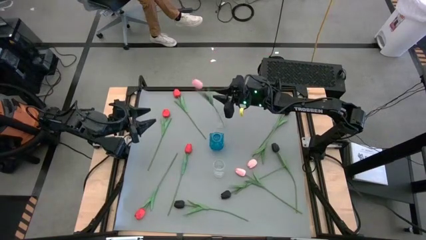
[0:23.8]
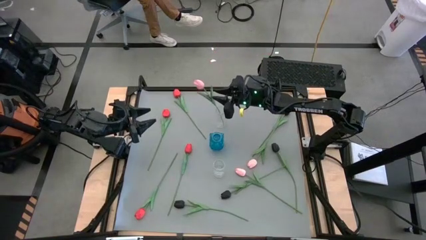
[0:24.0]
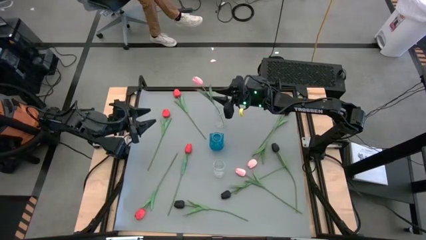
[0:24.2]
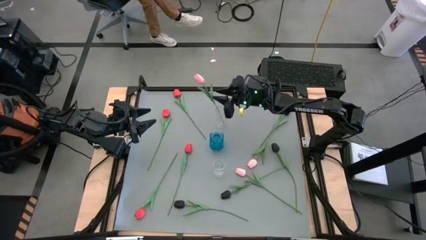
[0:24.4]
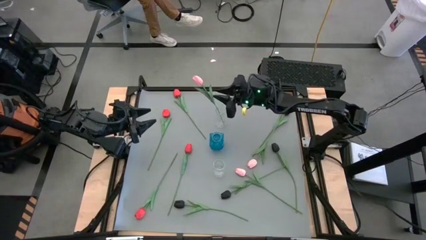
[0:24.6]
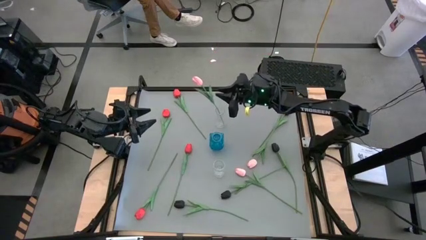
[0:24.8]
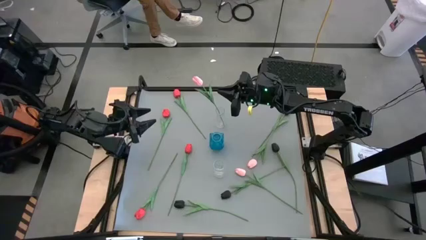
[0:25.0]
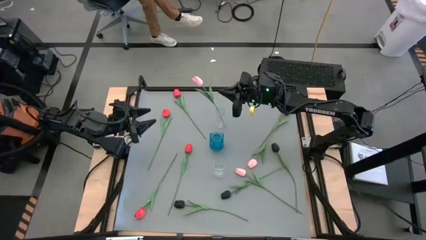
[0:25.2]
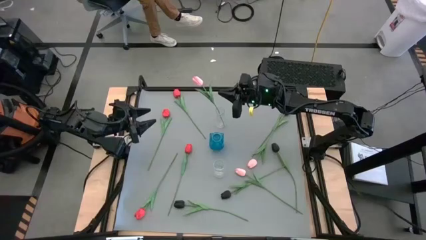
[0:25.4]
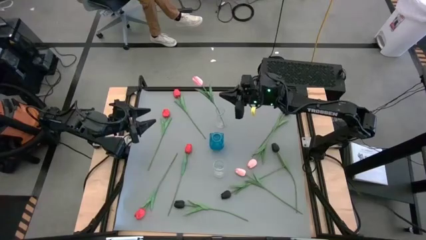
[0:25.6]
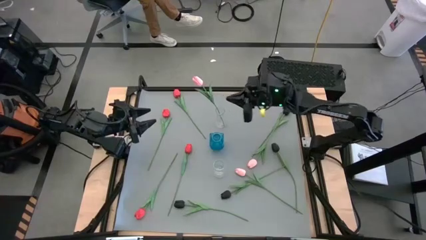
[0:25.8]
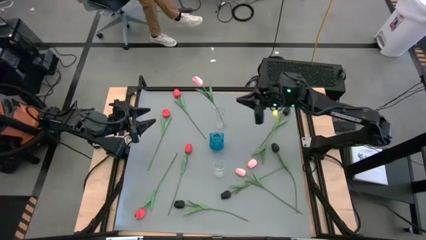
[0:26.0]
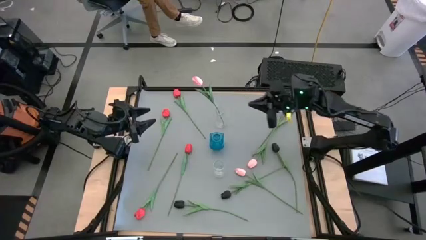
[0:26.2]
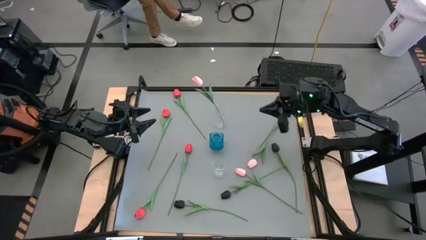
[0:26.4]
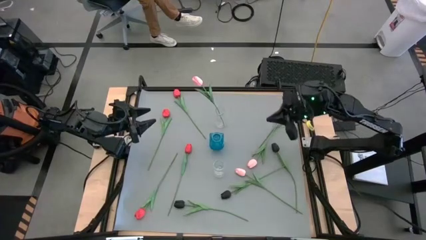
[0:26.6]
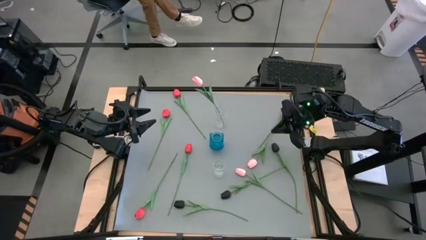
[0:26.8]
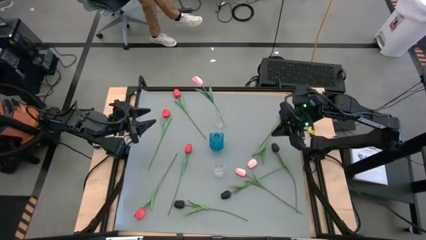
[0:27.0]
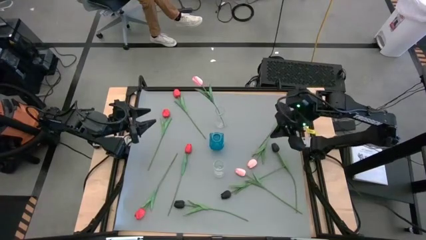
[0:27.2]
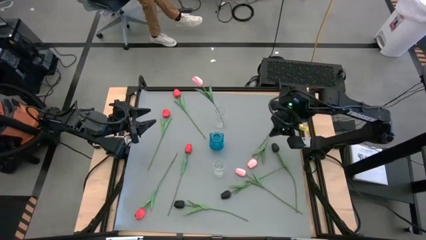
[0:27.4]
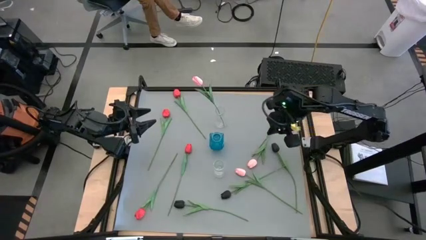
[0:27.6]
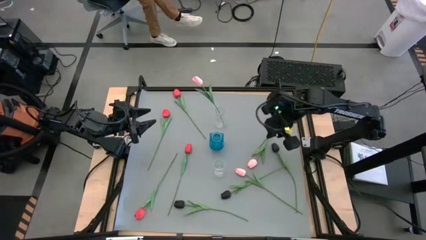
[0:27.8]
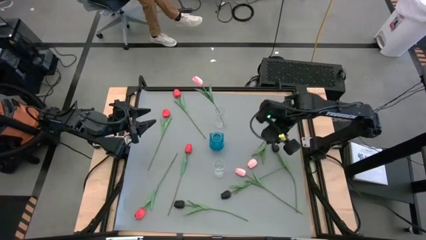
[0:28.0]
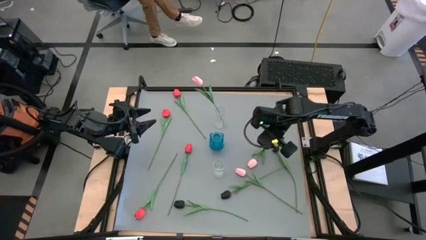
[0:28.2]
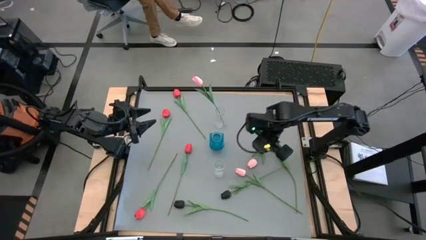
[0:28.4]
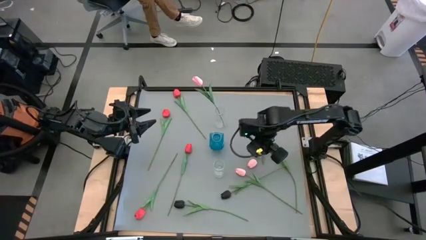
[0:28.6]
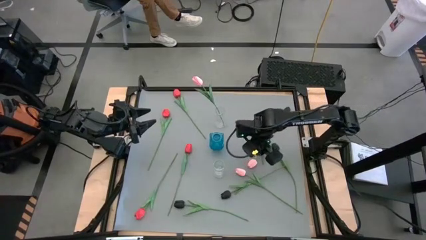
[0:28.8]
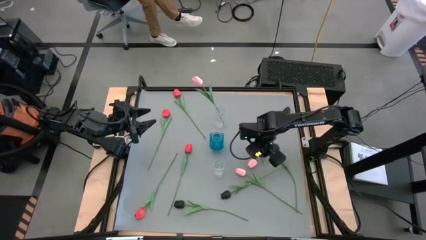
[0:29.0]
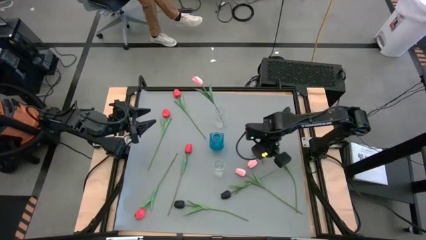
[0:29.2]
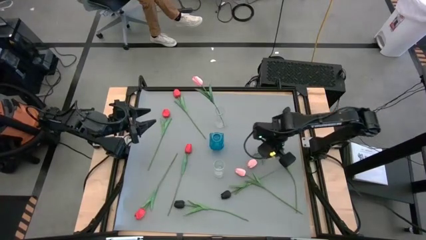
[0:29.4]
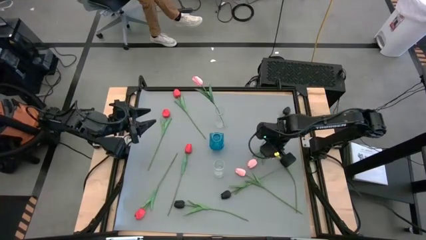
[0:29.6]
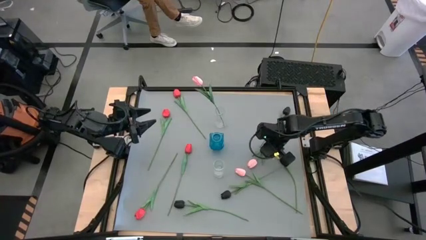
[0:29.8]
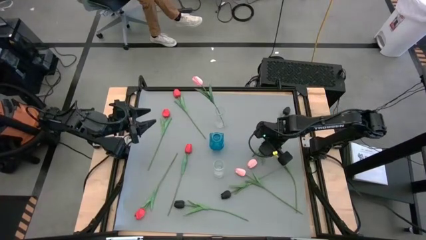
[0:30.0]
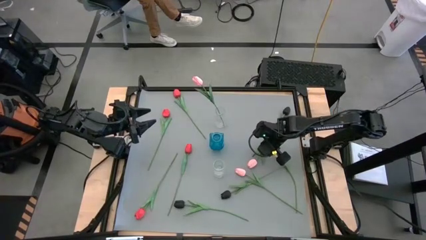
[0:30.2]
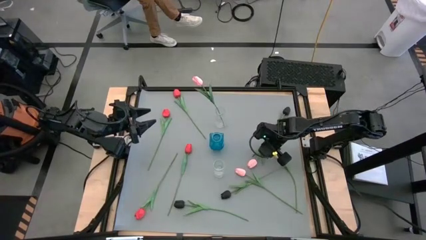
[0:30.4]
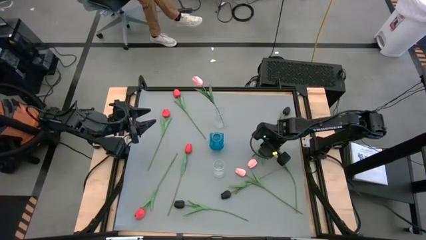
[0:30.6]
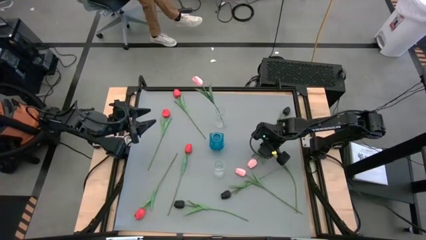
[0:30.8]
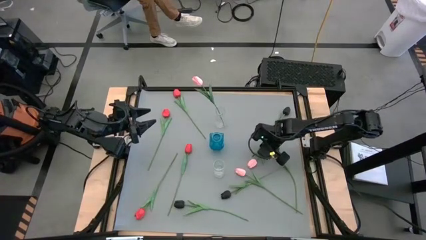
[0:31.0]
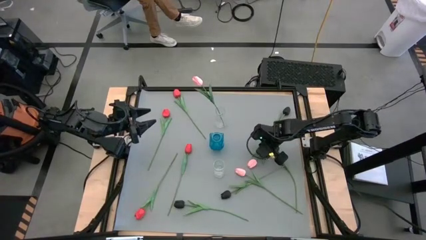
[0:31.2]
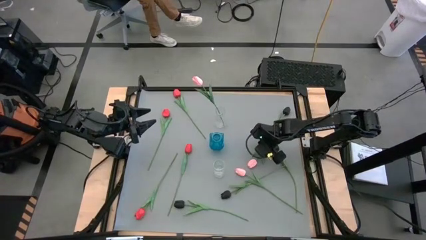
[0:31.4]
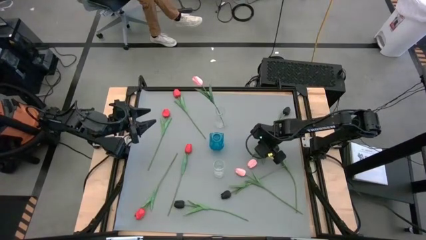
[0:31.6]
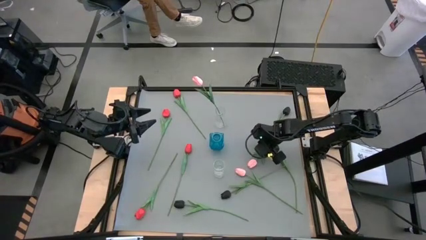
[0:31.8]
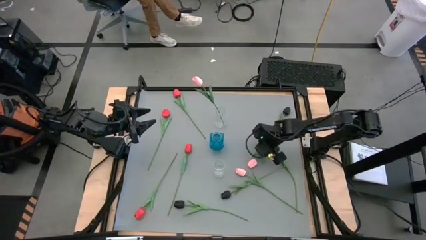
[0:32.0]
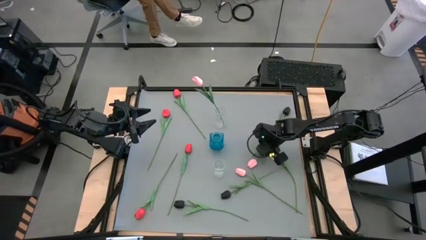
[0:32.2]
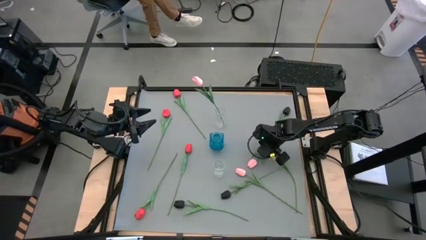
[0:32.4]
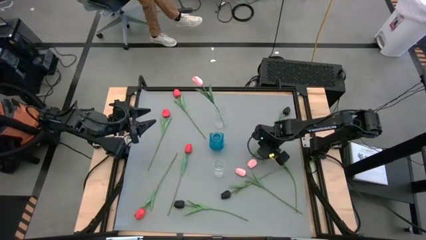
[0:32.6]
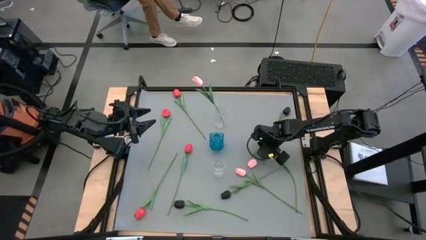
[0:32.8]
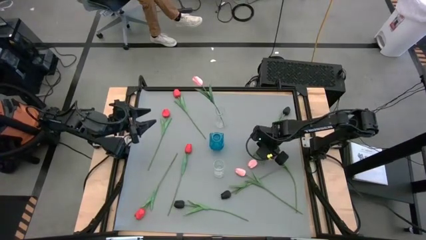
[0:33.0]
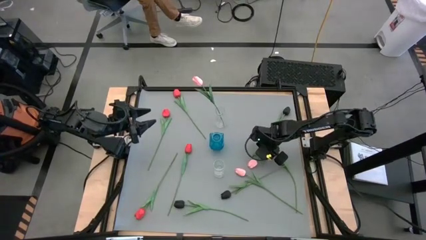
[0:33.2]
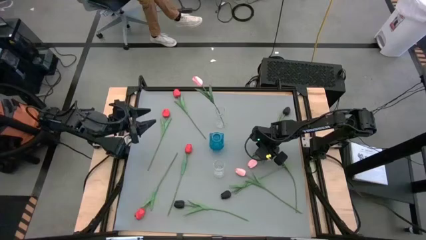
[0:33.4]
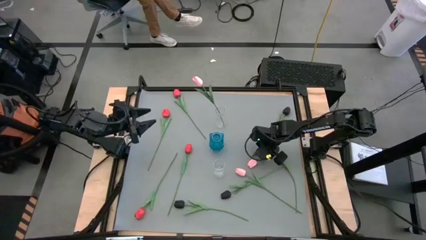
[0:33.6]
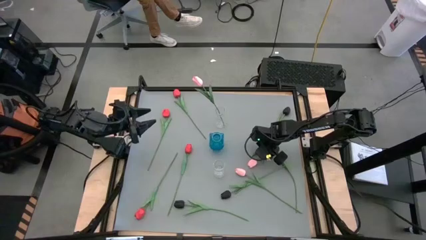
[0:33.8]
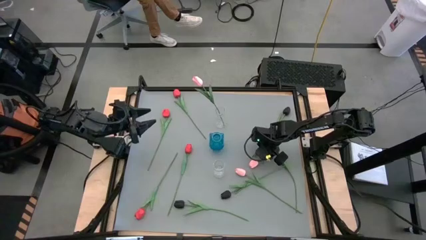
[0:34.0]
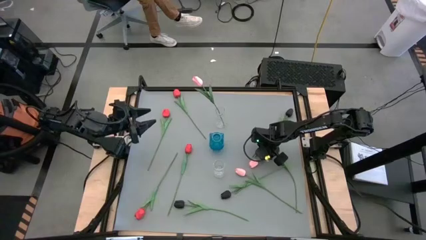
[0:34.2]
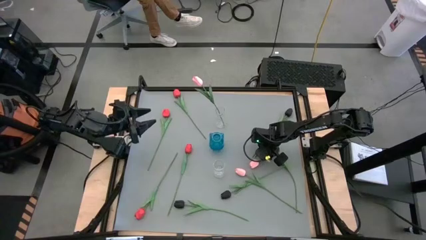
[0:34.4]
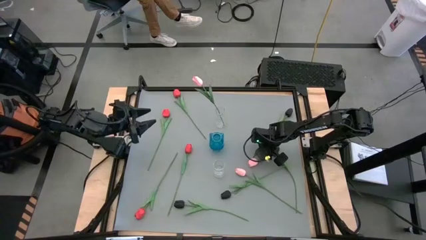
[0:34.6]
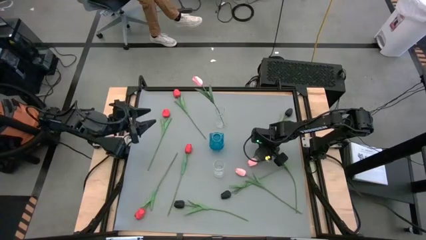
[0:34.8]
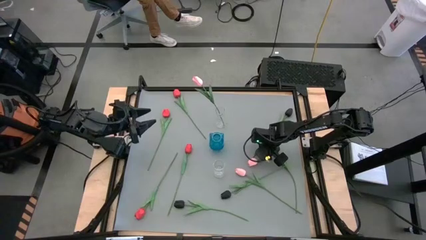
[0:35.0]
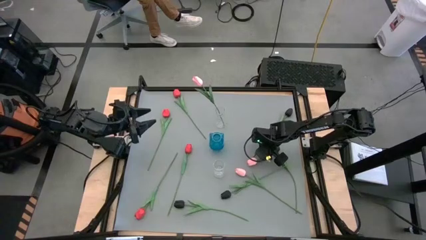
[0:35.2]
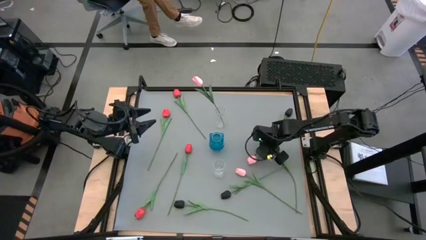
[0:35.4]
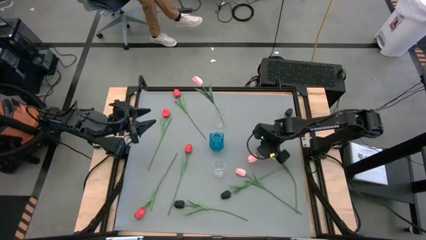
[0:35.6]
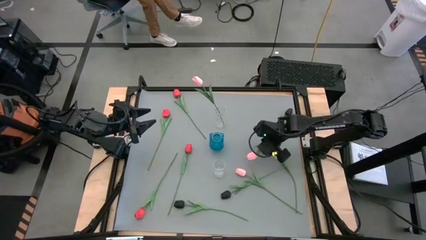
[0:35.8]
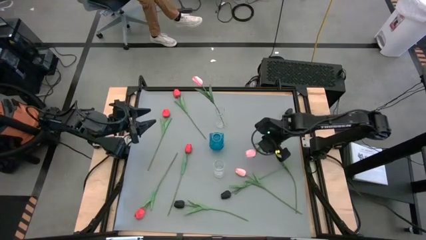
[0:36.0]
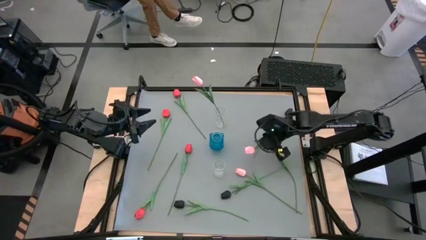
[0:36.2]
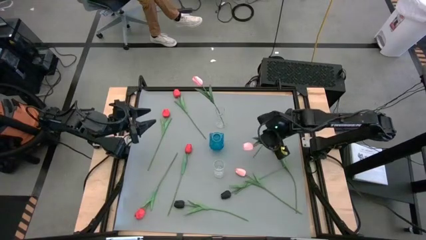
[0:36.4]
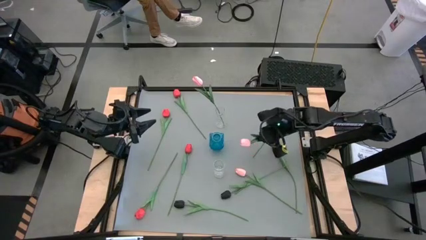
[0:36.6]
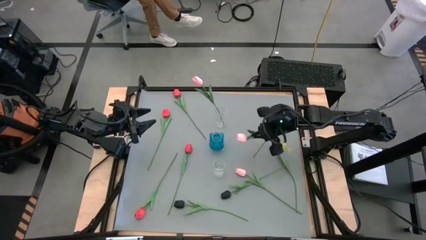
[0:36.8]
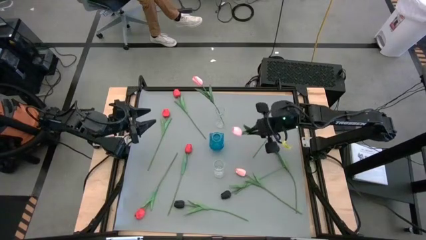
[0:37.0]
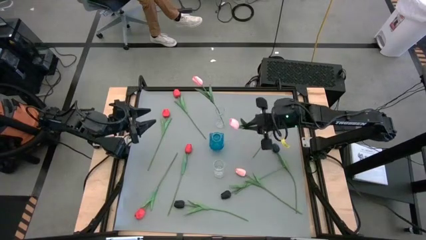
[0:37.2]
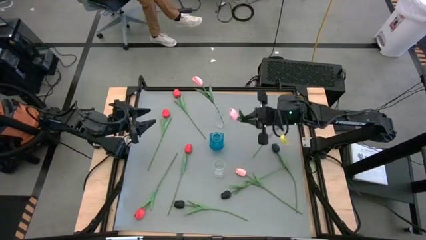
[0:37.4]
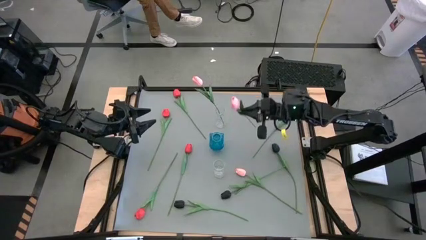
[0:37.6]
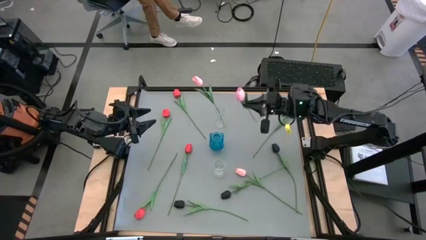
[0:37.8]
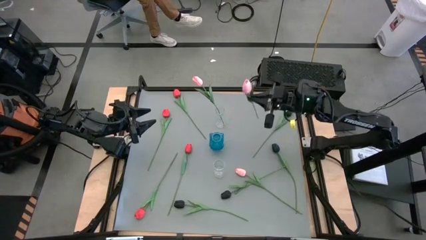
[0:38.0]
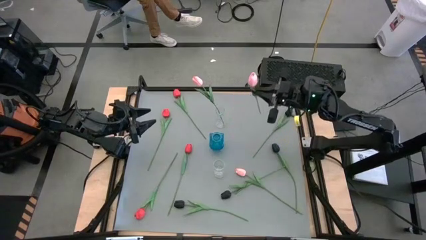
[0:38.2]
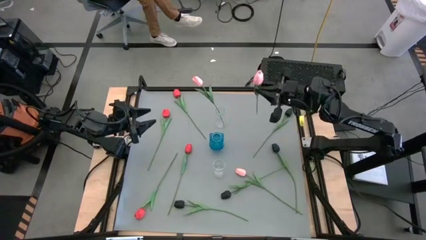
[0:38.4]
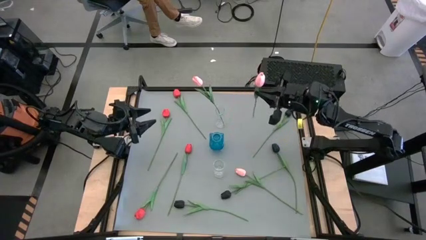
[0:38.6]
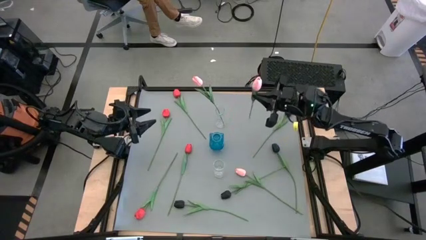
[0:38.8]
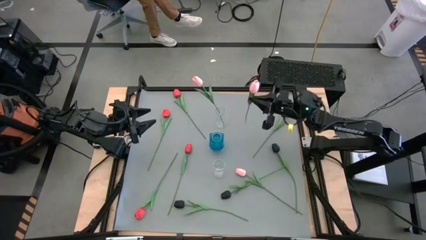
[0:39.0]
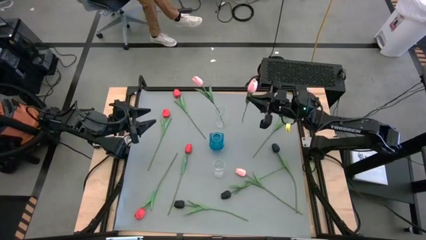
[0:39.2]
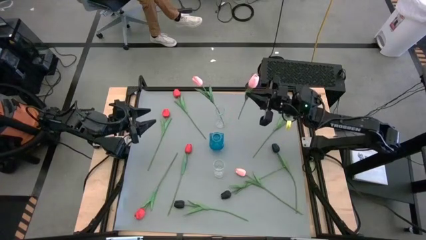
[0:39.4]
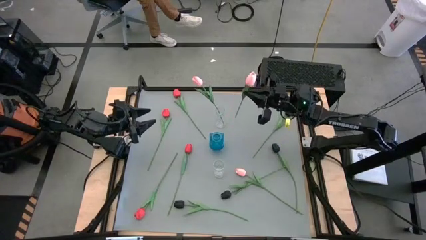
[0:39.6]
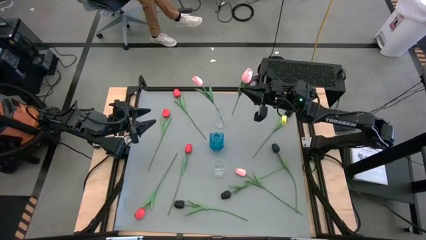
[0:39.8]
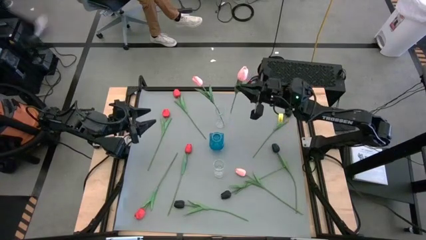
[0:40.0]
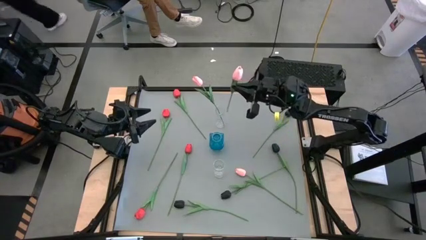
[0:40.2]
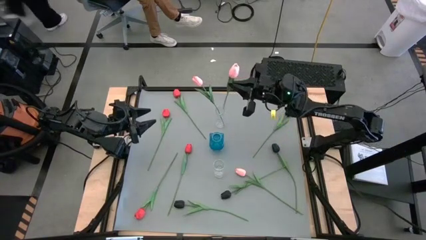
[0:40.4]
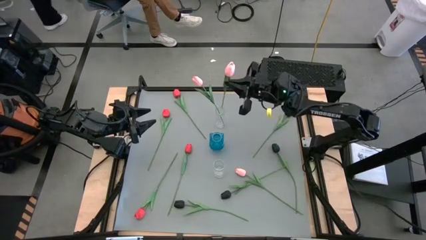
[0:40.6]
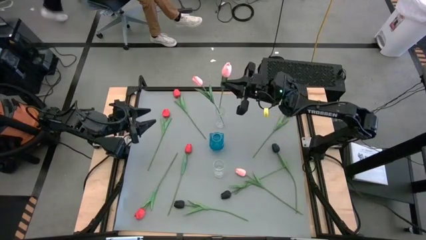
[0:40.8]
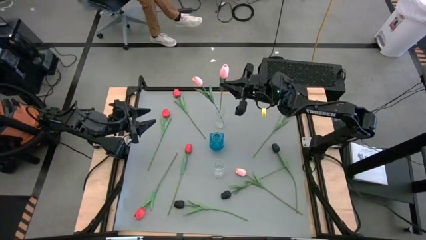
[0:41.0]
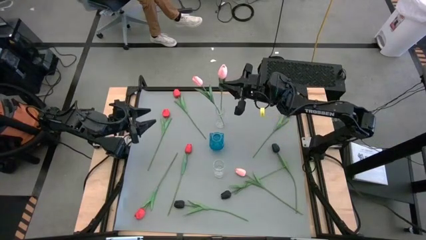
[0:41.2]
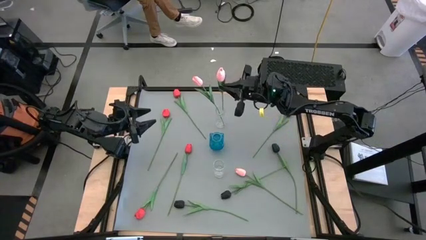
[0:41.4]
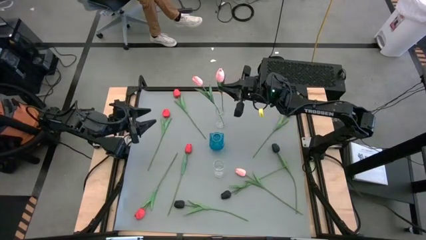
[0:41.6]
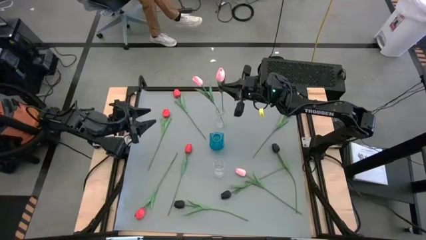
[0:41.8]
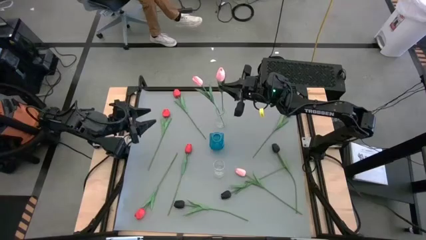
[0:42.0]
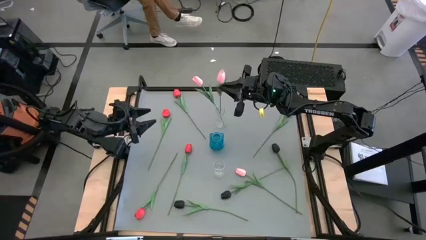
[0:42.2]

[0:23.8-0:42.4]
Task: Sort flowers into vase by color
Put the top pink tulip into the top transparent vase
